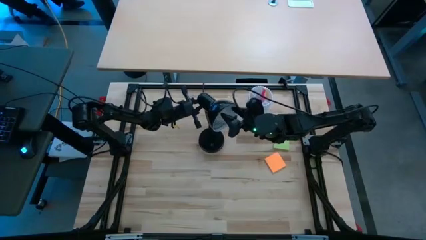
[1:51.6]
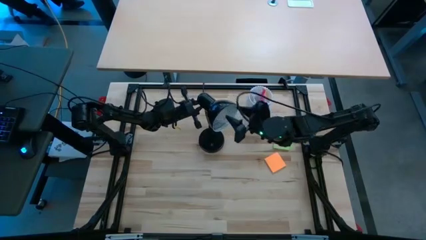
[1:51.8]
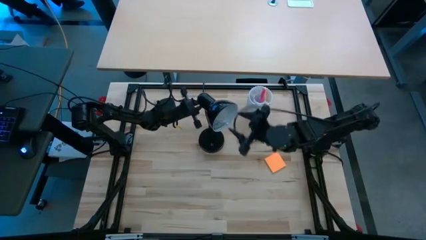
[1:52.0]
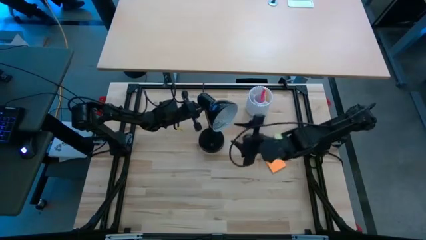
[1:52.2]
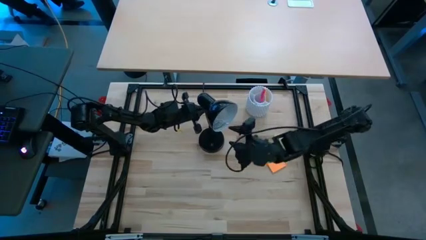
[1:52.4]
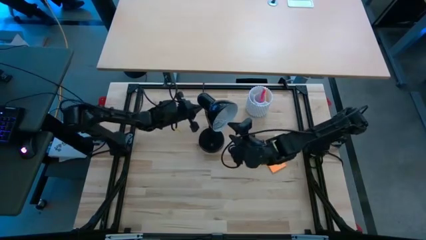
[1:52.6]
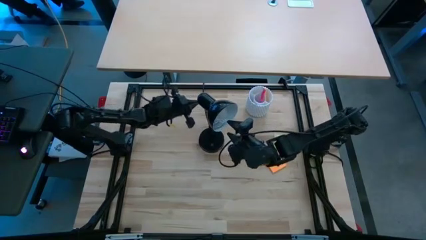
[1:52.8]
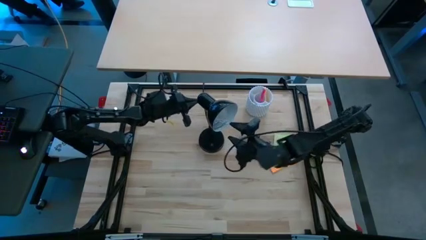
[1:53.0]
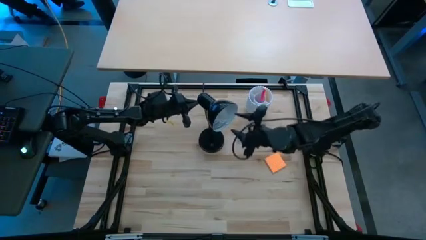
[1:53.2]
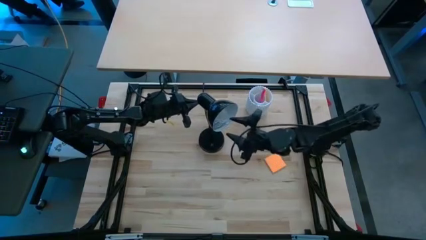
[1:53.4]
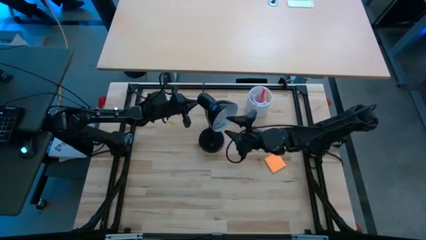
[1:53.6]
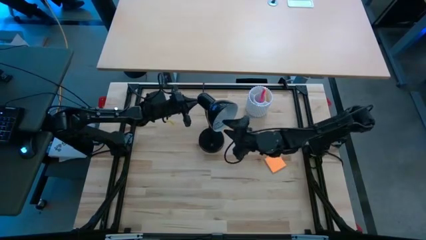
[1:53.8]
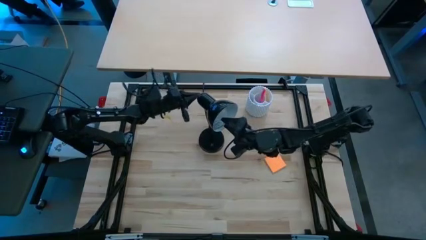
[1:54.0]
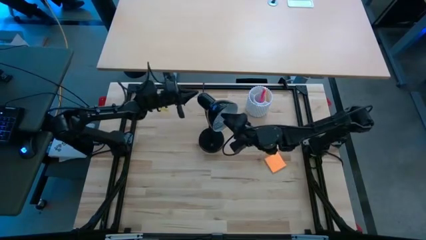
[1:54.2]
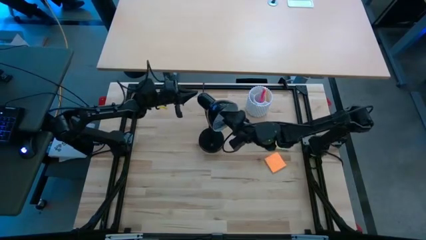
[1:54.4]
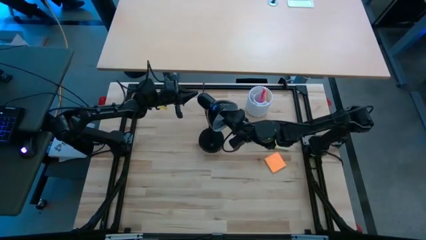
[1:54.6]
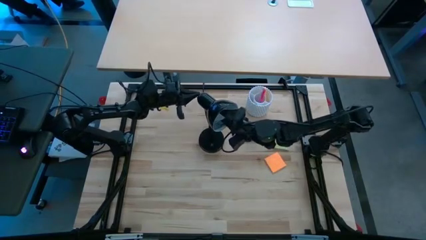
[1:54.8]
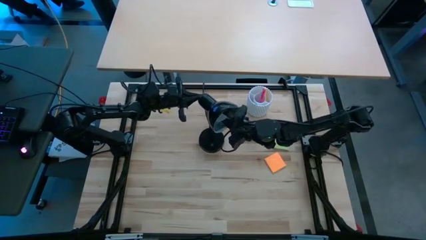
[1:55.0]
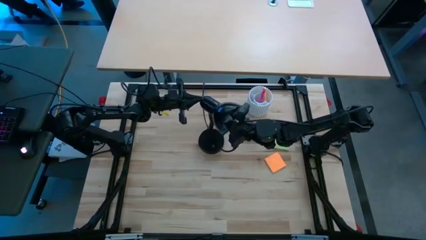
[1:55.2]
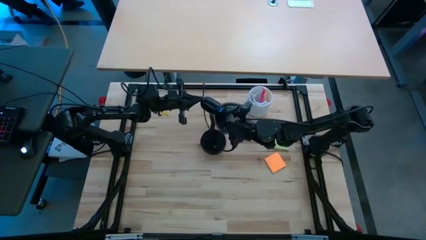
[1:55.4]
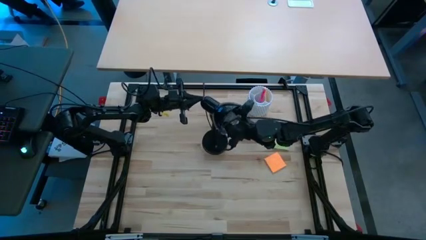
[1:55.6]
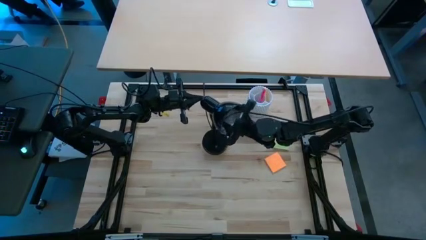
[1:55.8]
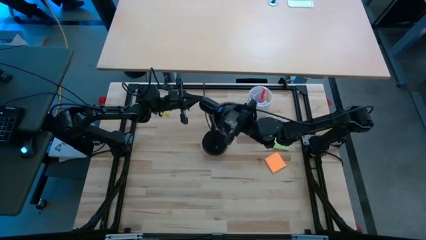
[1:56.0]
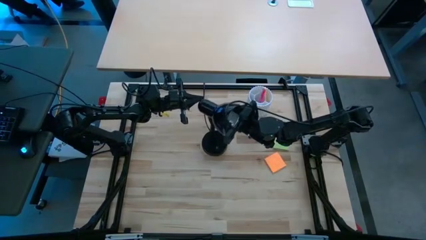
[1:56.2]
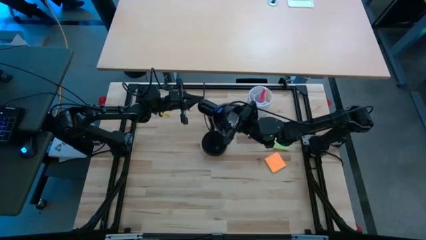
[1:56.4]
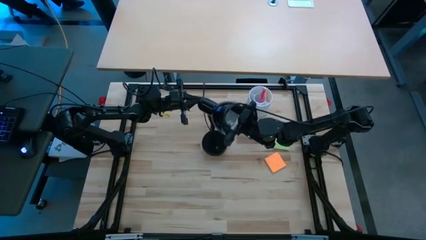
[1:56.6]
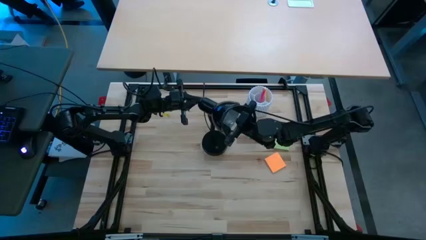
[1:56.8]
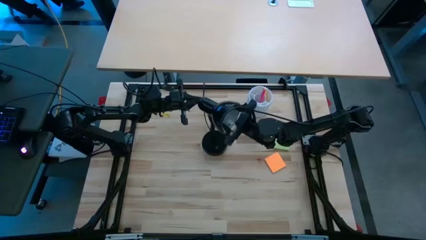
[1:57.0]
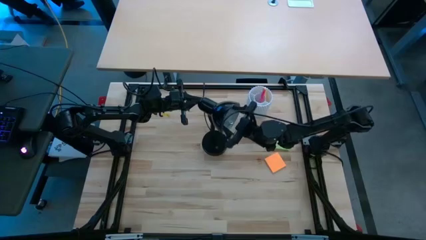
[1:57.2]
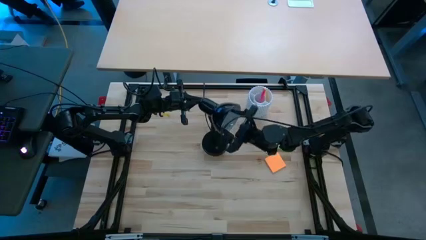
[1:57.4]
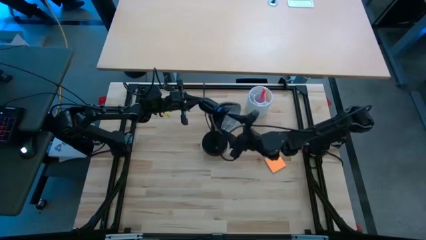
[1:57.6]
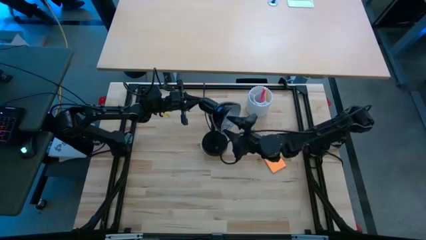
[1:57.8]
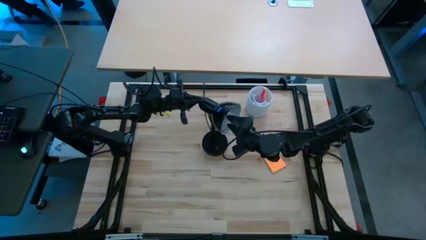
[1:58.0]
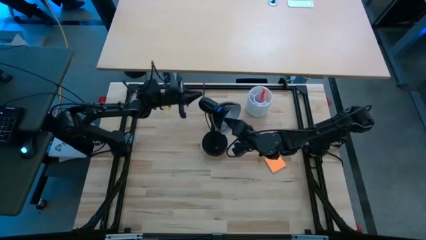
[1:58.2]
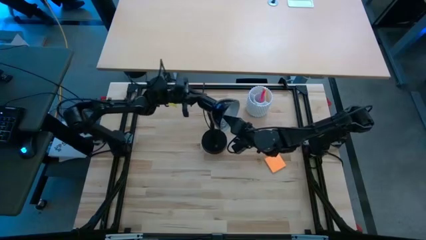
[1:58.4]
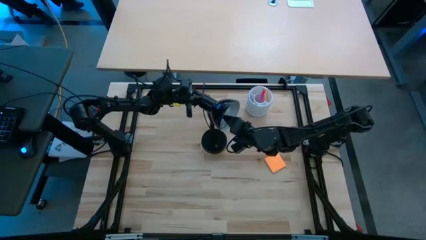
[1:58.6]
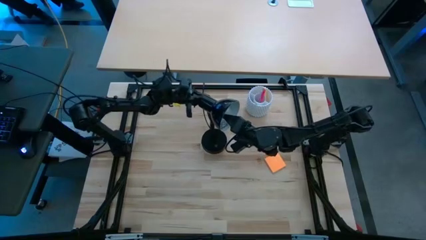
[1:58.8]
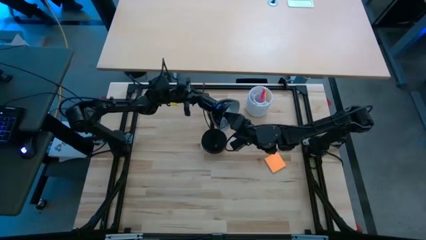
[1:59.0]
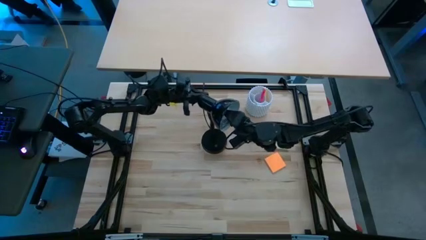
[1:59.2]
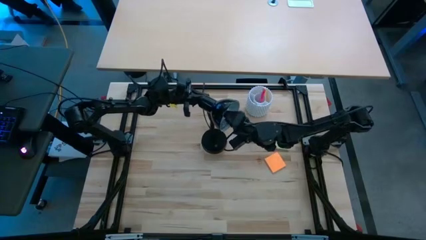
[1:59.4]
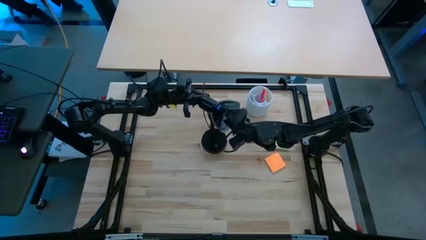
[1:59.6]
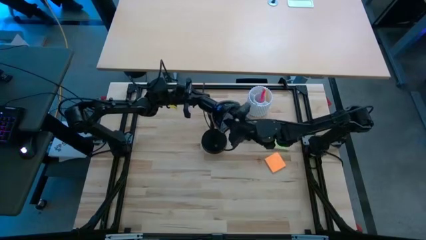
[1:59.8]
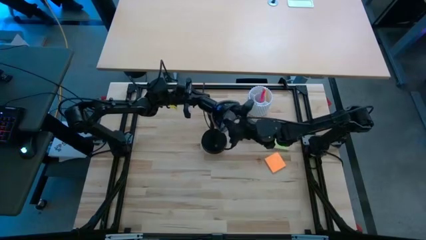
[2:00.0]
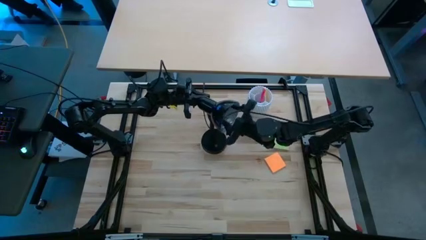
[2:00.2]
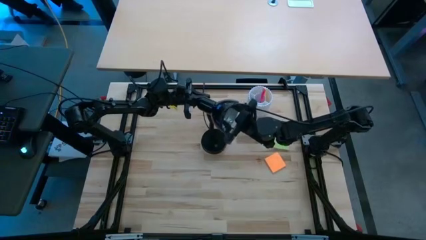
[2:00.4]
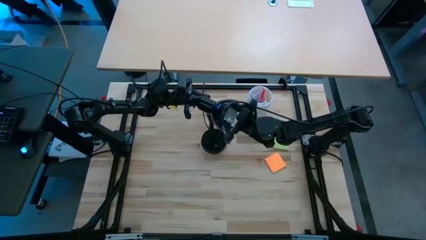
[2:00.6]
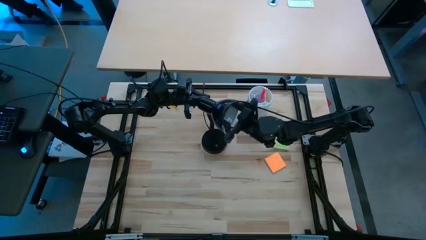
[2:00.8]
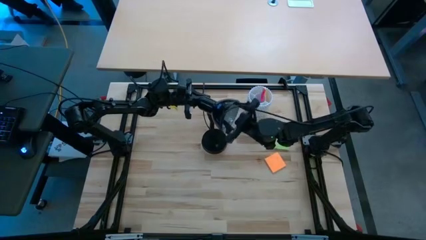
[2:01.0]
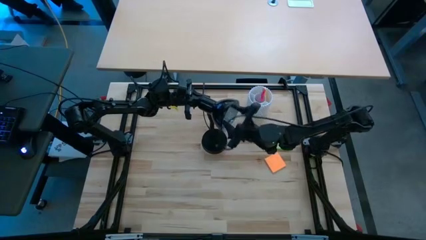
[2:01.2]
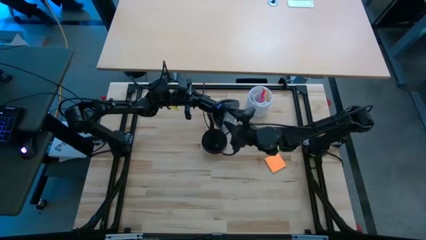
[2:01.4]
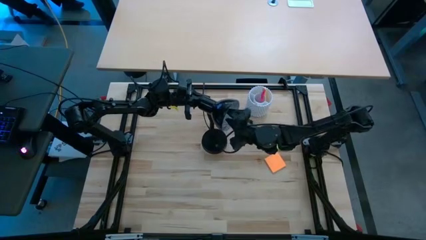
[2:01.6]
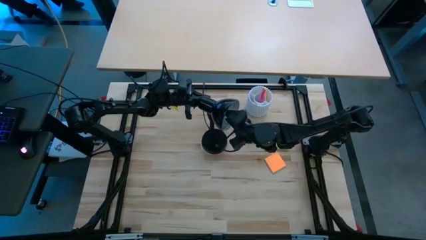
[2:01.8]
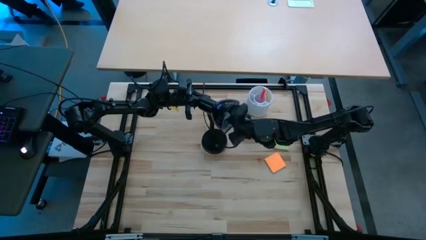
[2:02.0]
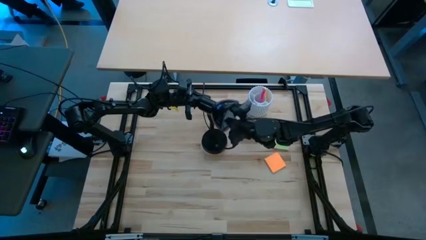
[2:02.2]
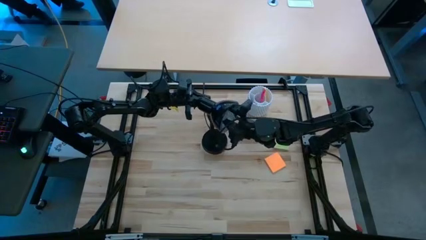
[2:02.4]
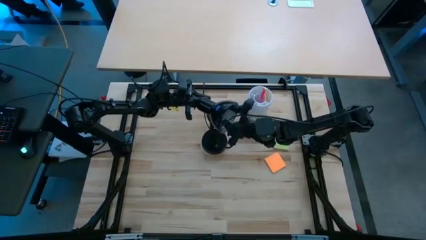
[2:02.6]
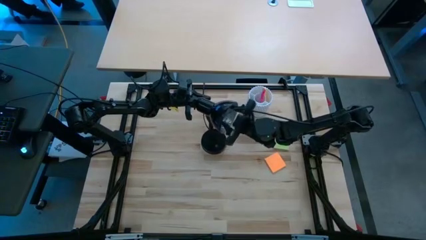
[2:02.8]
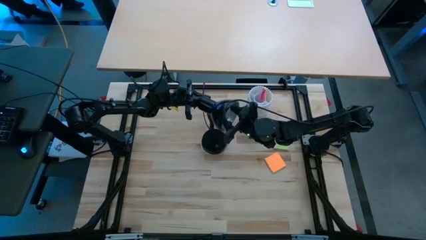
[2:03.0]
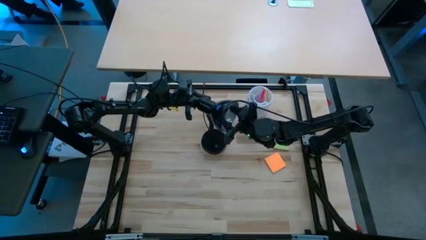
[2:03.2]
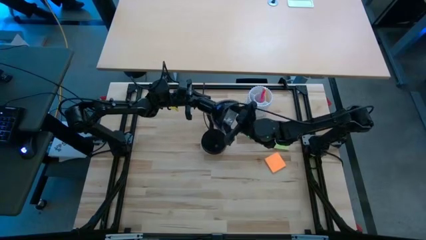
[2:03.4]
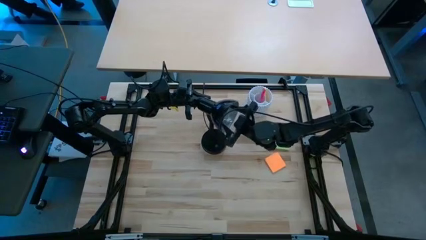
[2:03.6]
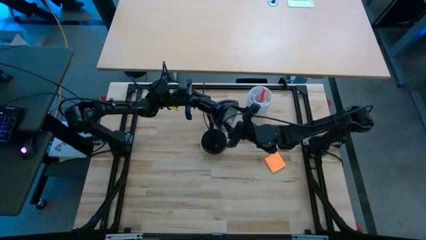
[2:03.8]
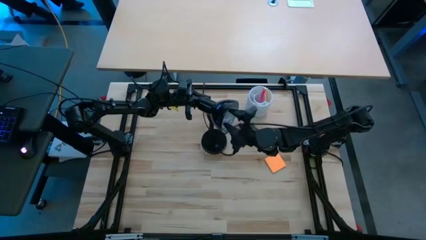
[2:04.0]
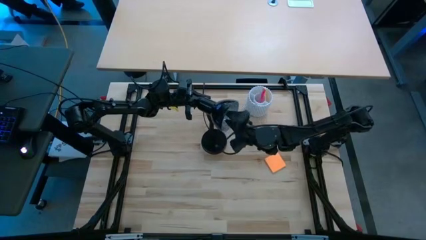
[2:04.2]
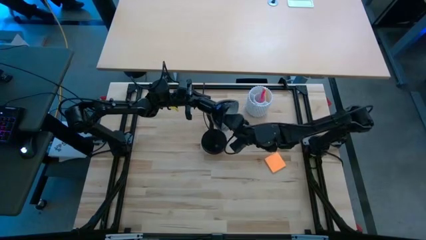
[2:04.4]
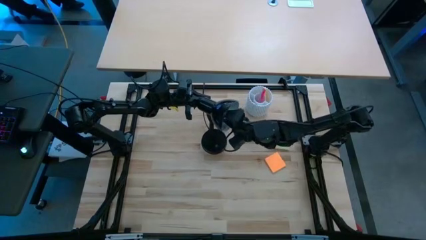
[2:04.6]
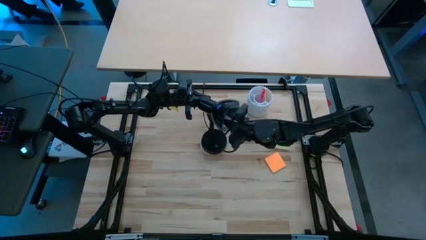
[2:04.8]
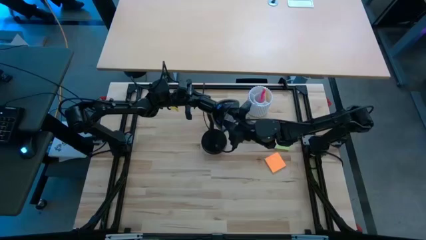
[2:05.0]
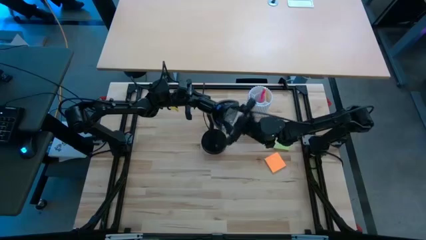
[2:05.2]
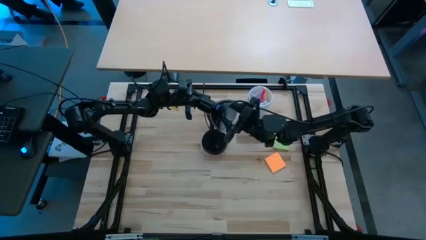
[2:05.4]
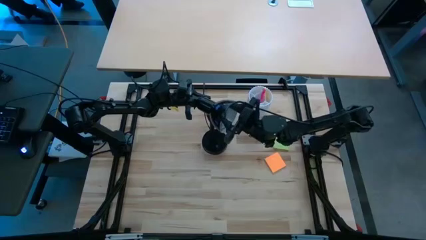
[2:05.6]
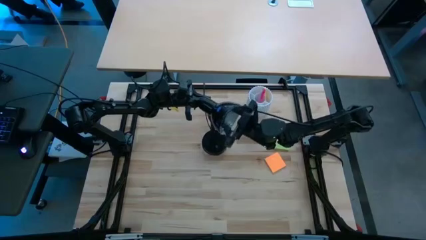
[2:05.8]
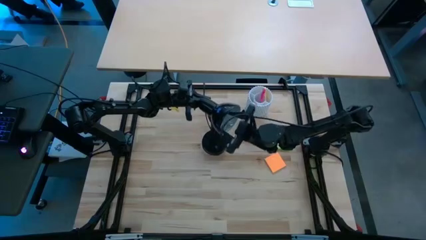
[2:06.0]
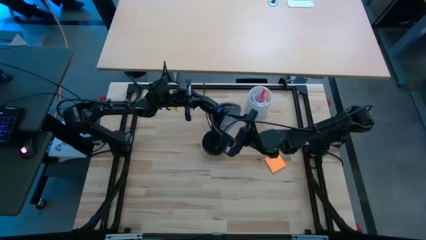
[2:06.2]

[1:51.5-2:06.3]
Task: Screw lightbulb
Insert the white lightbulb into the black lamp
